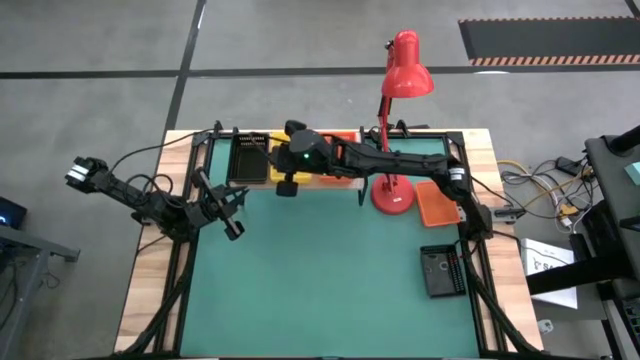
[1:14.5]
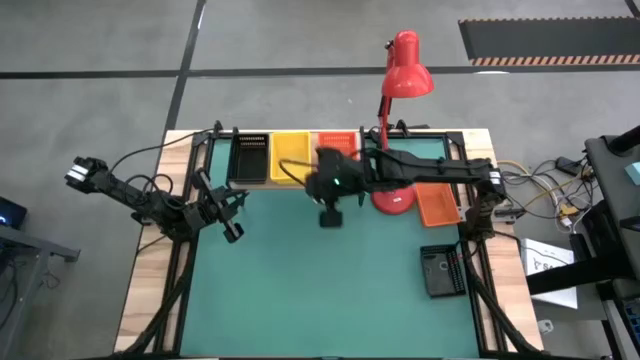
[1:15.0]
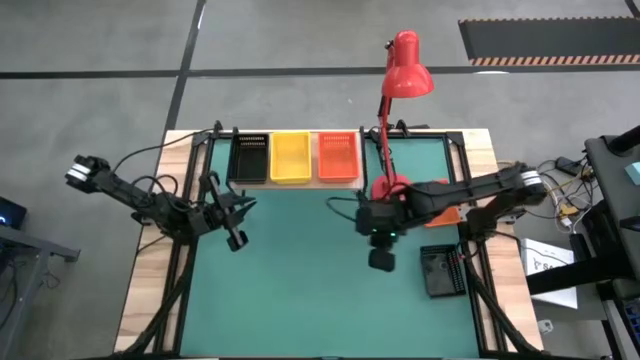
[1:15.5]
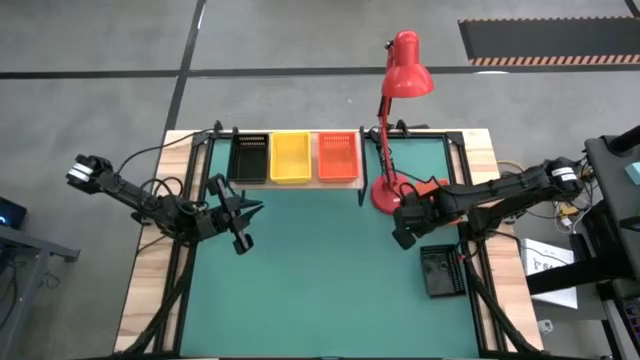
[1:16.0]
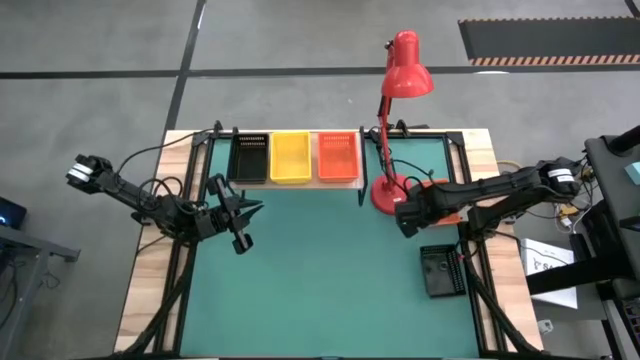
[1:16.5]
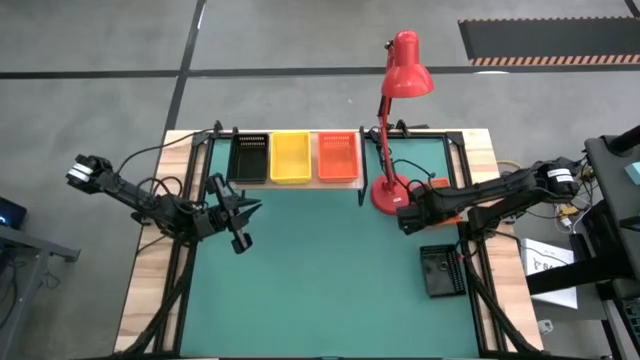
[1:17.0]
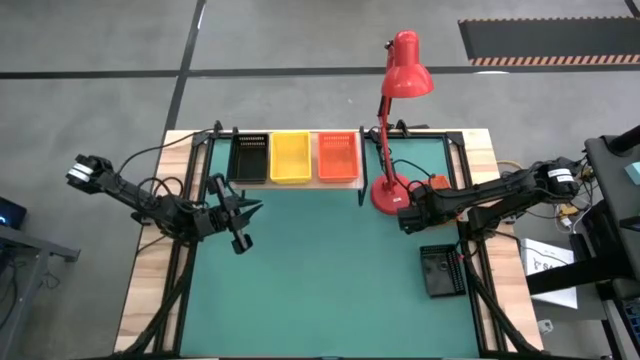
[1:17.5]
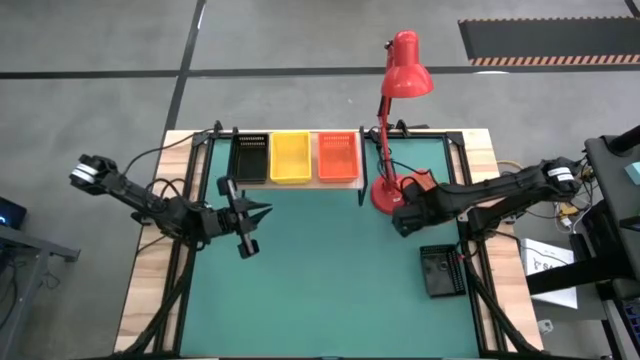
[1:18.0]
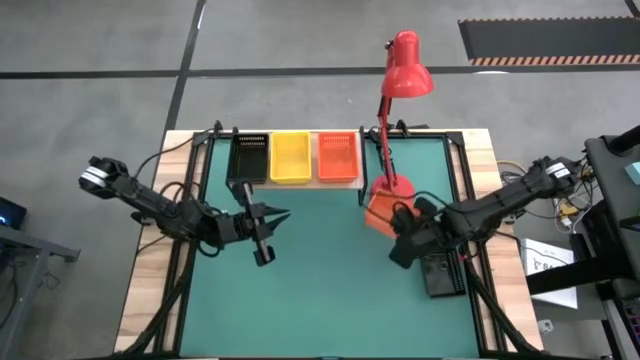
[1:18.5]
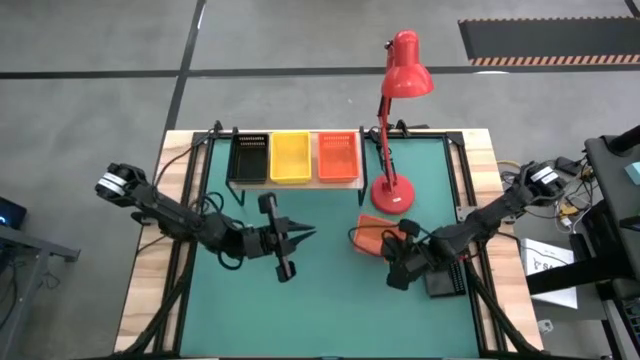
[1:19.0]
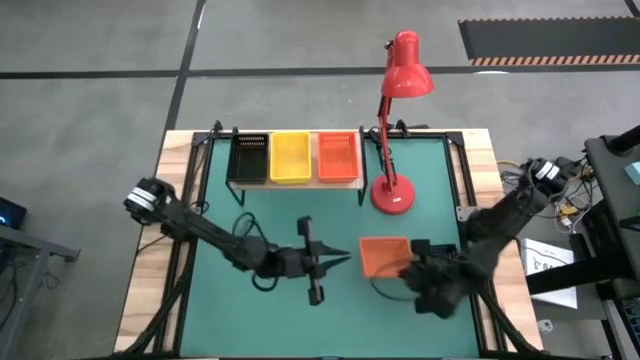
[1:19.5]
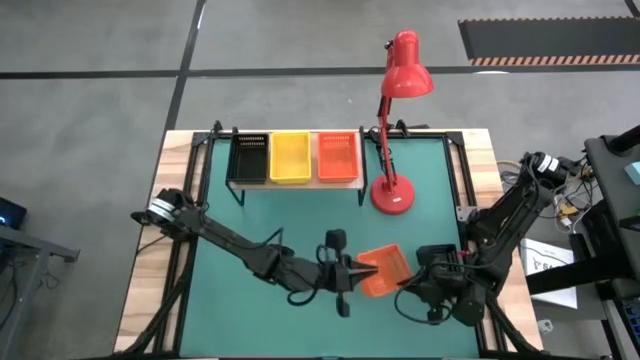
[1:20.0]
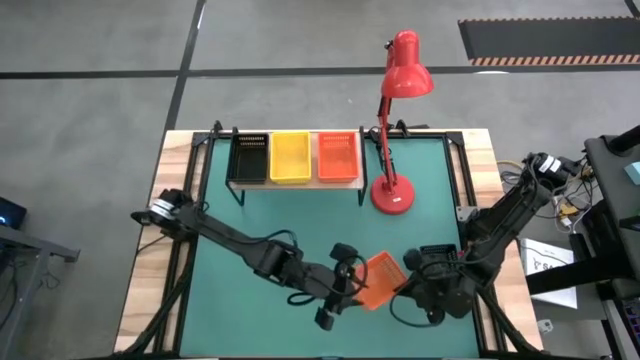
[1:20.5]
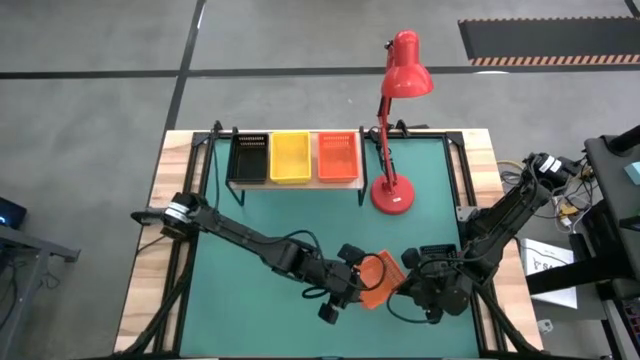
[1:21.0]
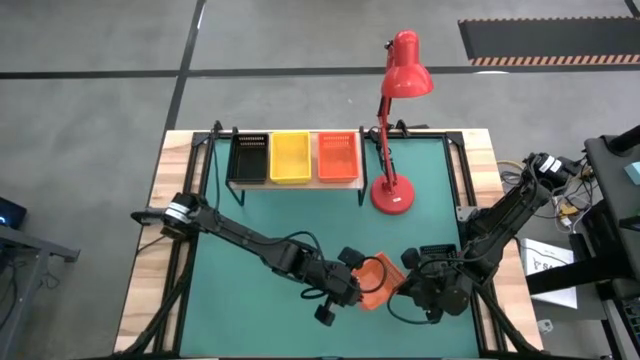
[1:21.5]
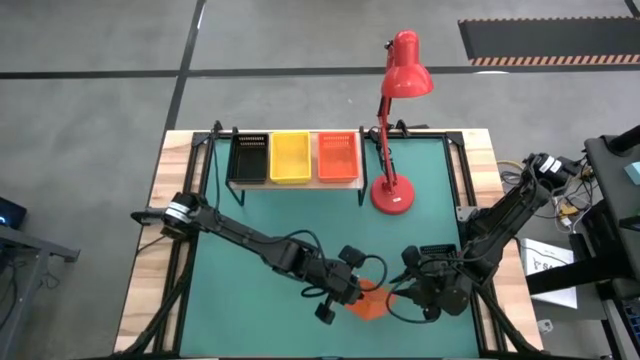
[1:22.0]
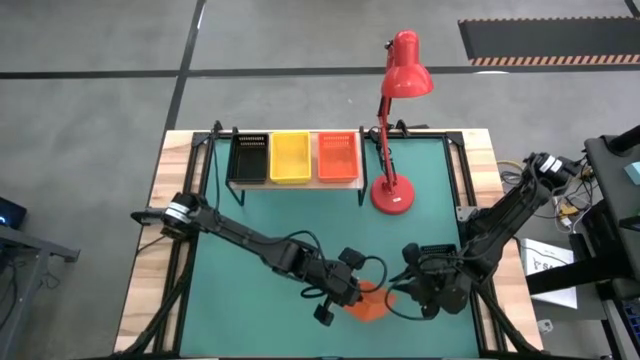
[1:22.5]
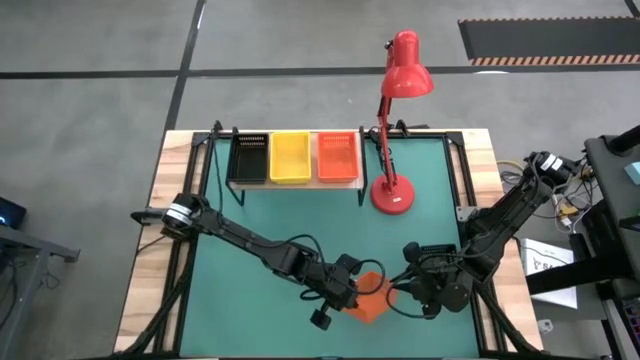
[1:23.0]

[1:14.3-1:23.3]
Task: Stack baskets on shelf by color
Stack the orange bin on top of the orange bins on the shelf

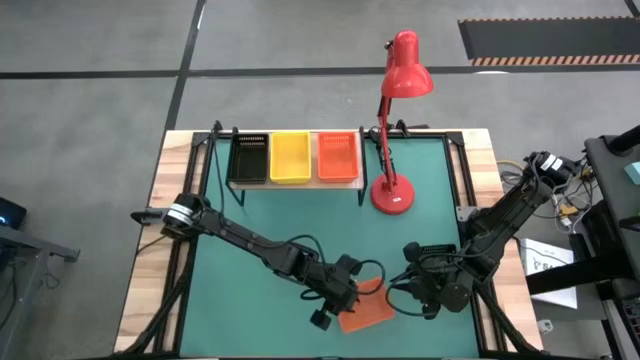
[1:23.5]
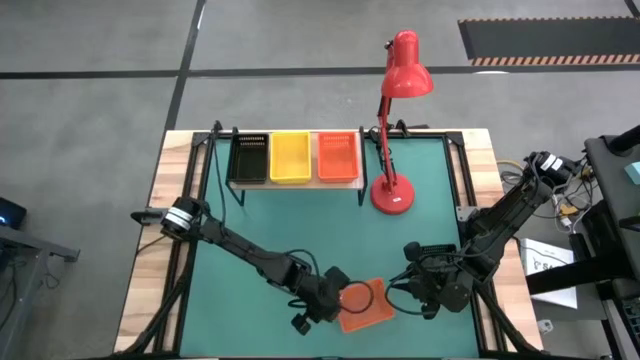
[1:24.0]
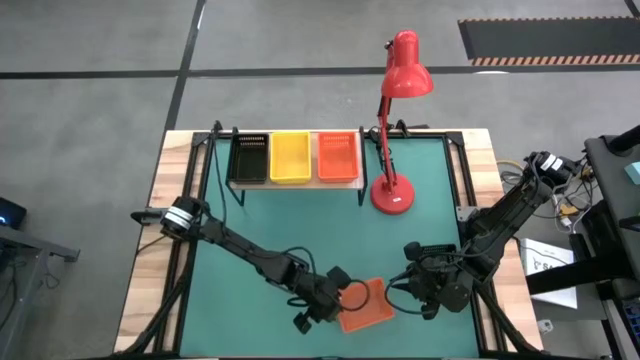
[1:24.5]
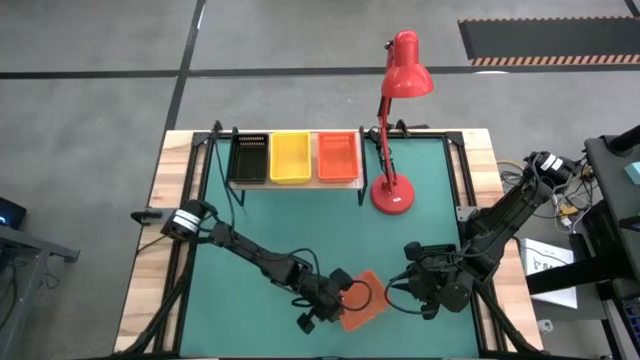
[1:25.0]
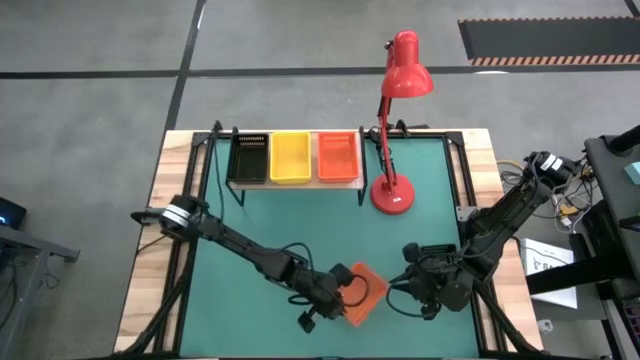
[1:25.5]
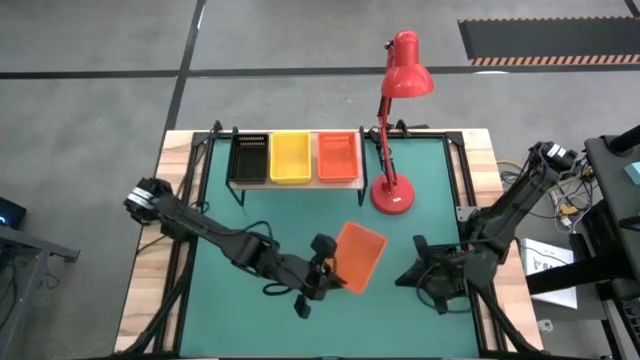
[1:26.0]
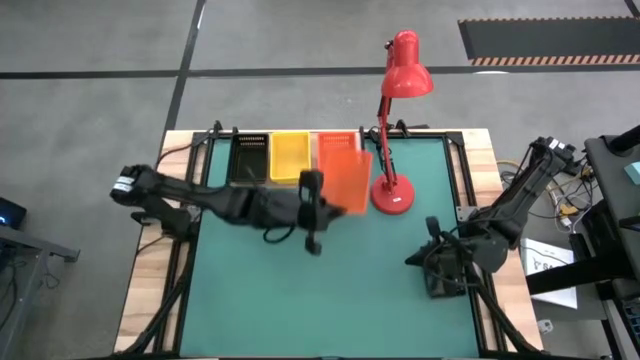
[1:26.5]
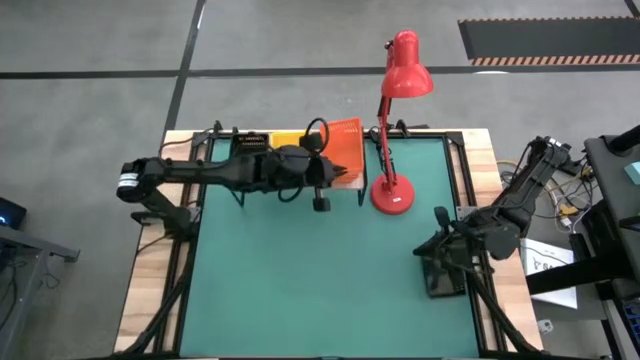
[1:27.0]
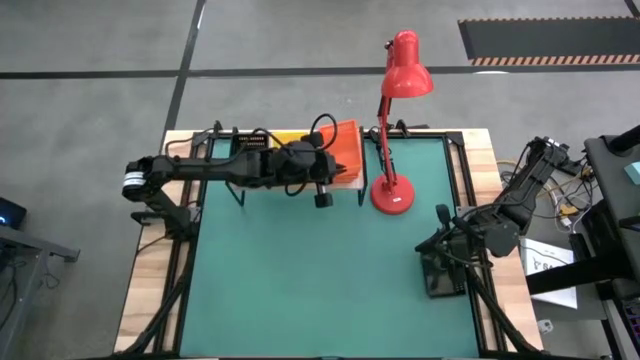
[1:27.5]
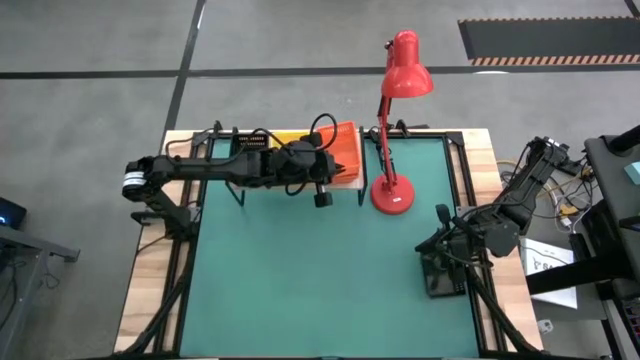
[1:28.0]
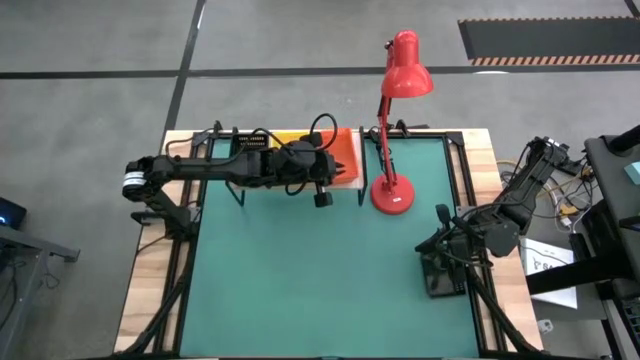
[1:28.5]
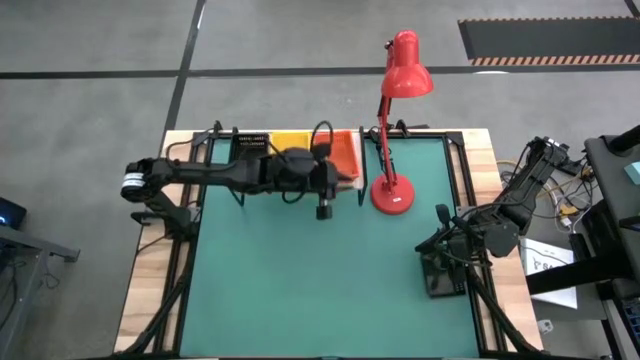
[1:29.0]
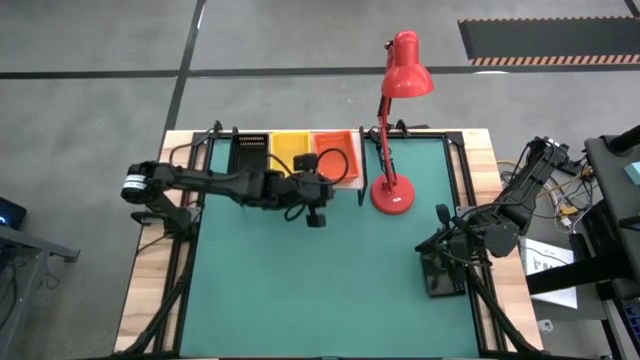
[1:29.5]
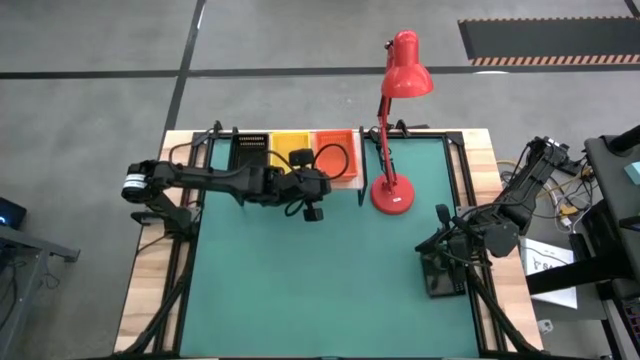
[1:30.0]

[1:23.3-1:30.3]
Stack the orange bin on top of the orange bins on the shelf

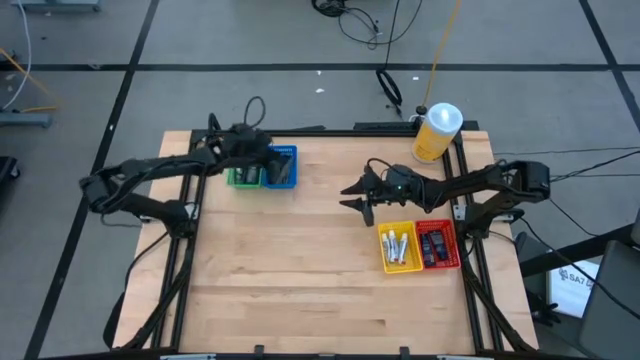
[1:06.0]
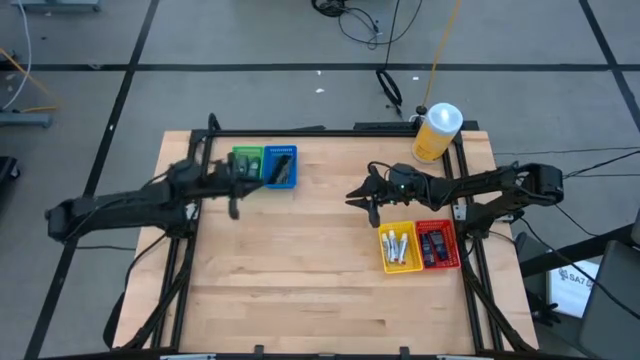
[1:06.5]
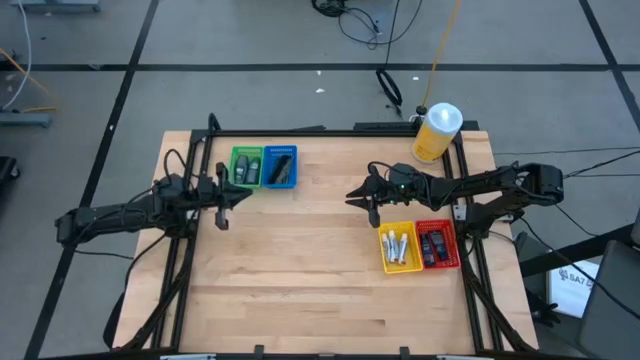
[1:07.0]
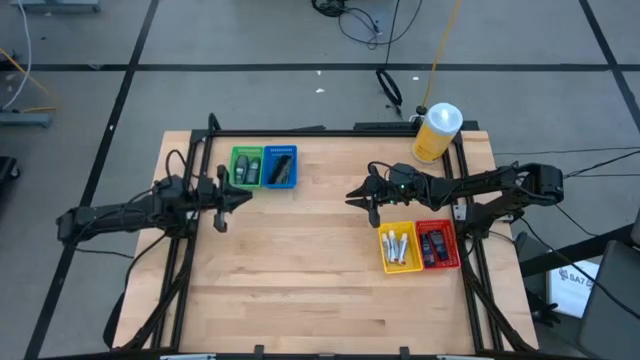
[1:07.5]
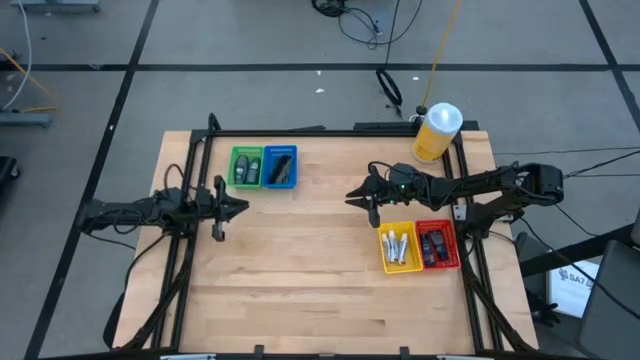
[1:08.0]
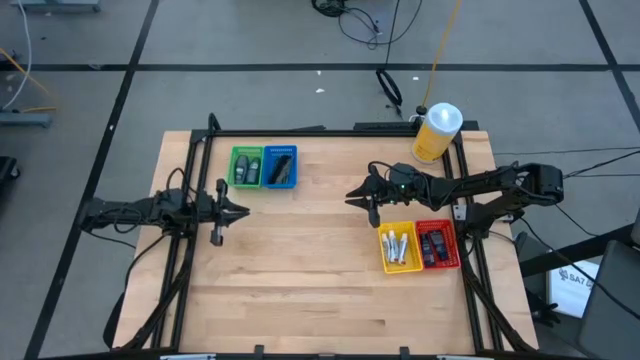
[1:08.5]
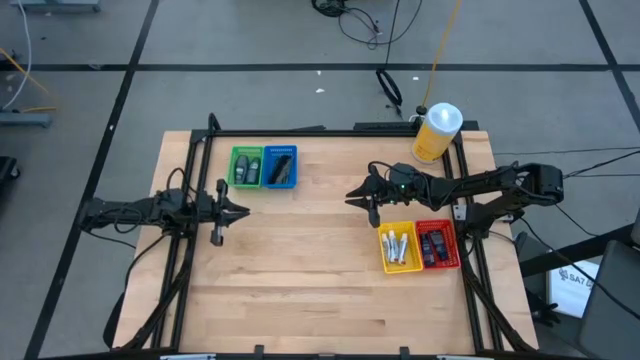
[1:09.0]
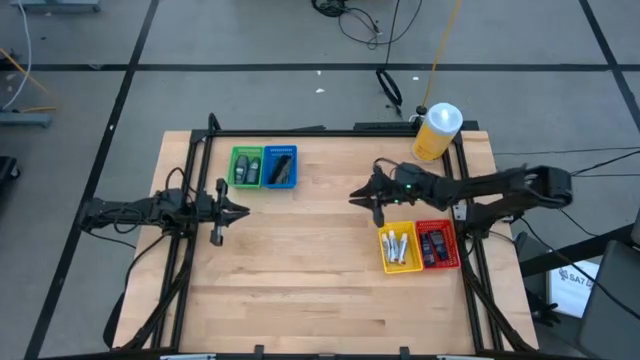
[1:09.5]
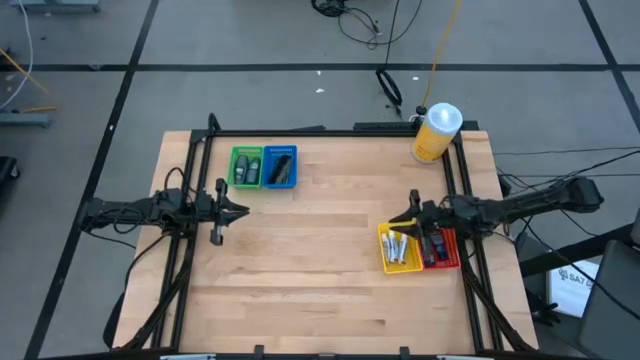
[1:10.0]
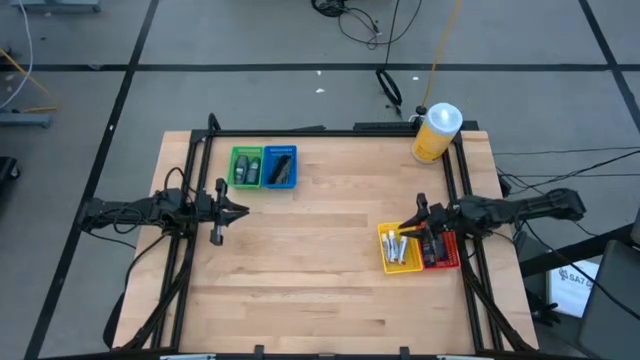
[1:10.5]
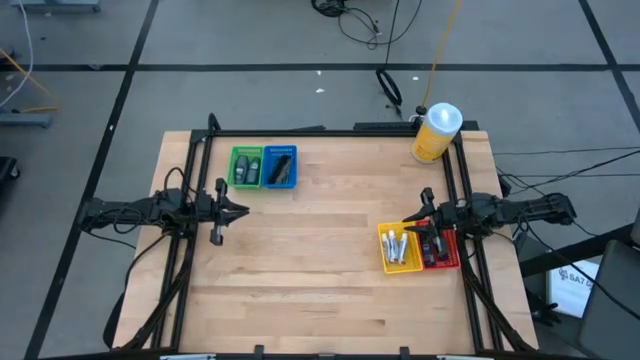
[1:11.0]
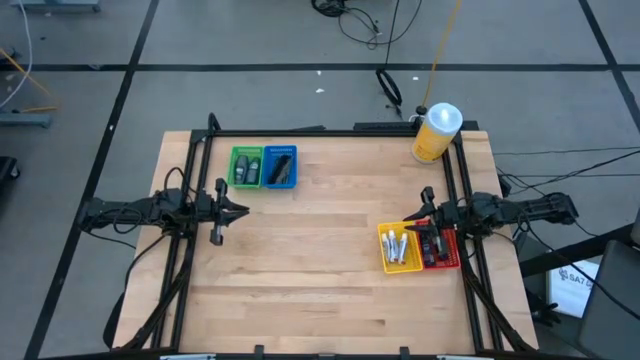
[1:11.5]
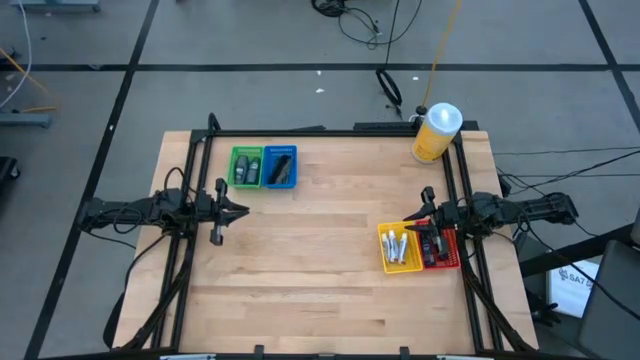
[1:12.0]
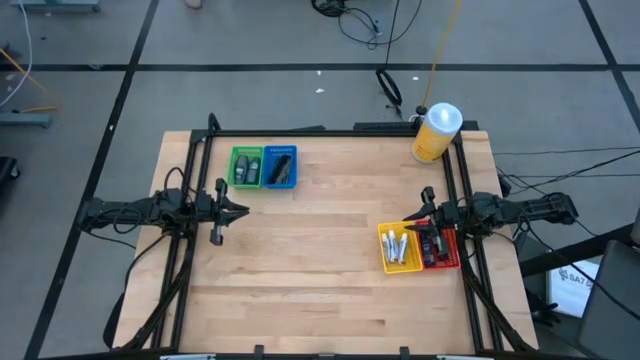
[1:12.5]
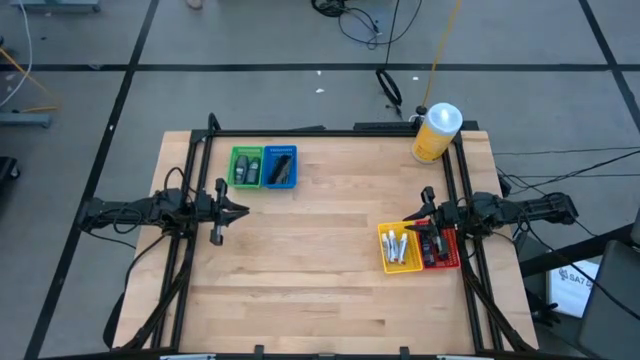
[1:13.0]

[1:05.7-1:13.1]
Task: Pick & Place Travel size toiletries
Return to Home Position
